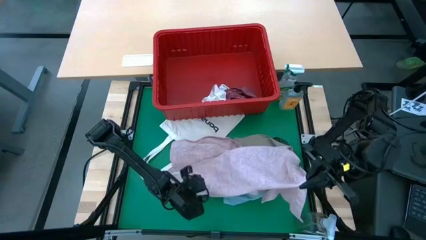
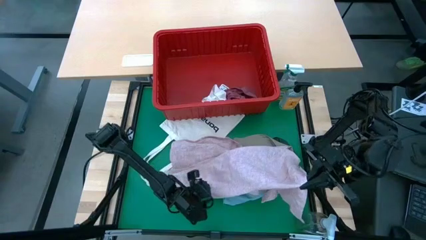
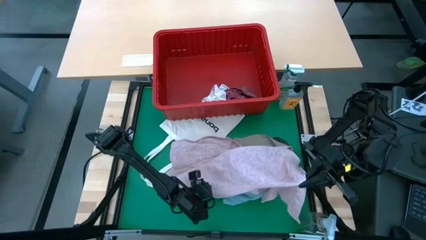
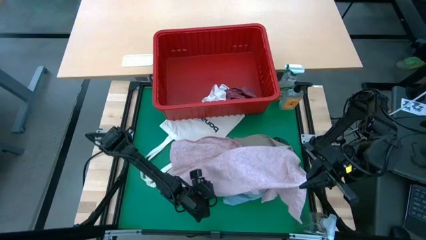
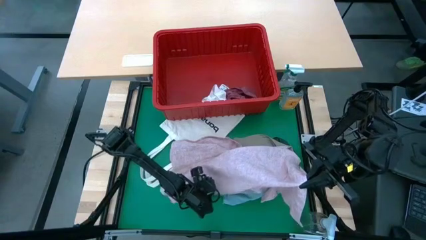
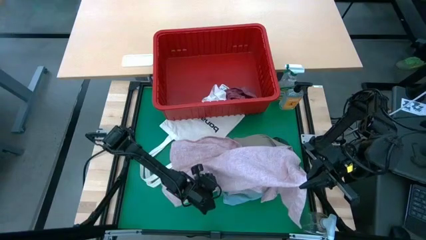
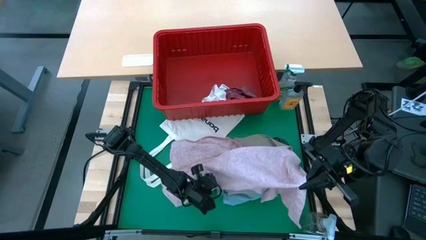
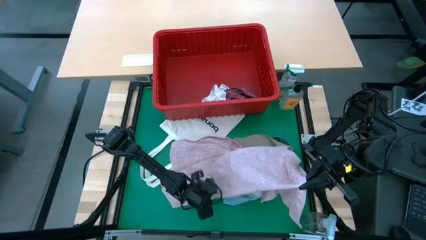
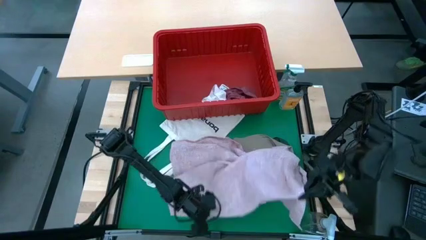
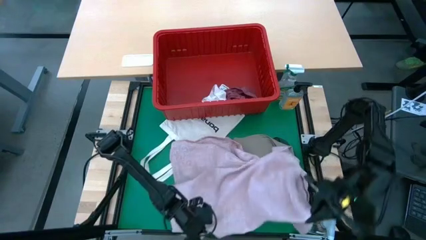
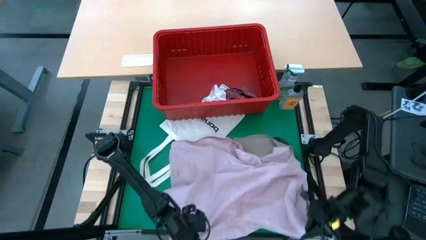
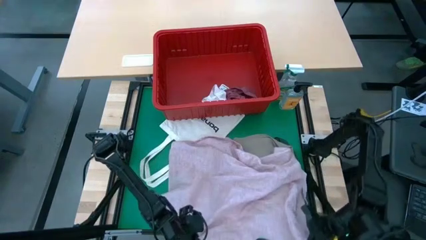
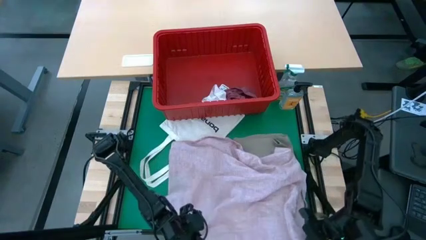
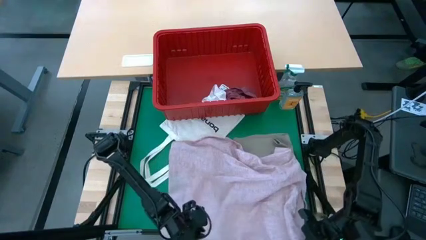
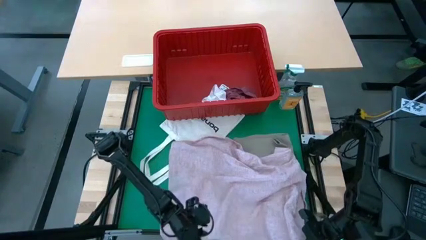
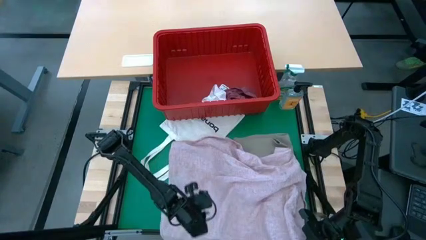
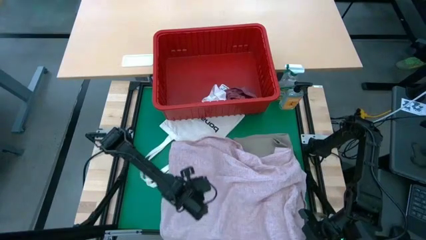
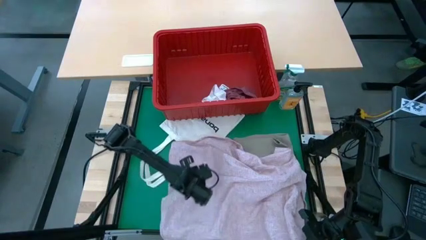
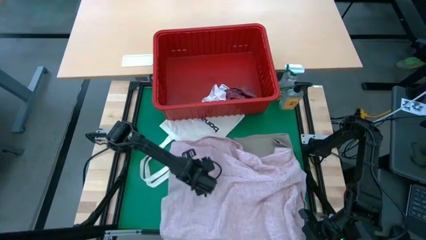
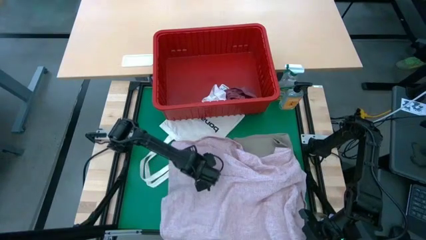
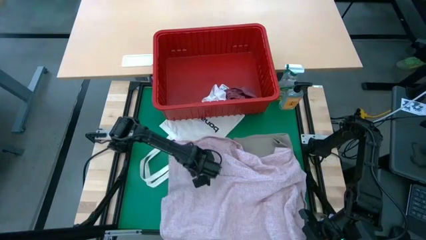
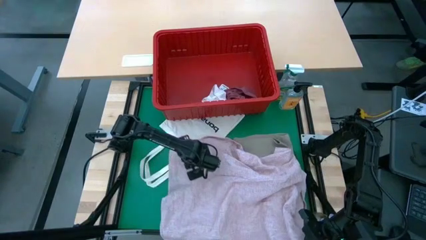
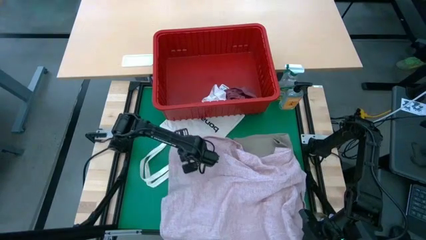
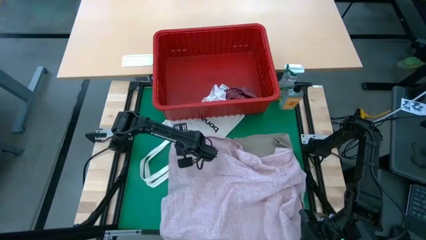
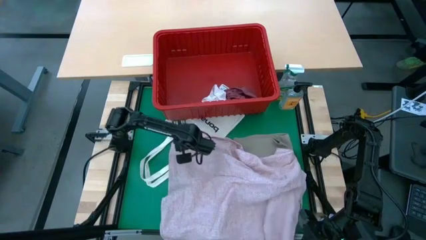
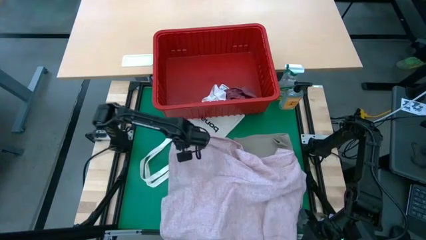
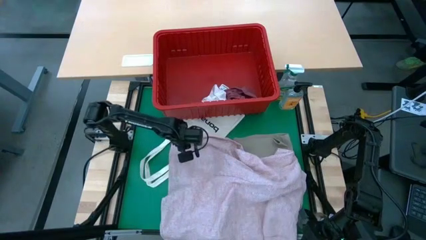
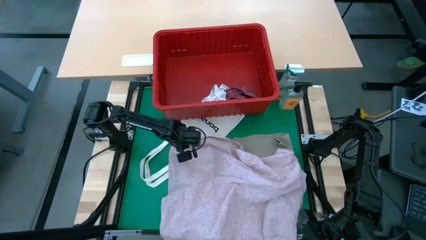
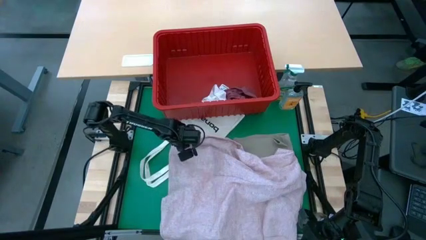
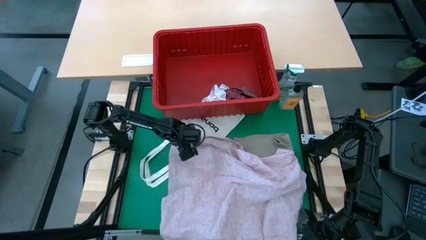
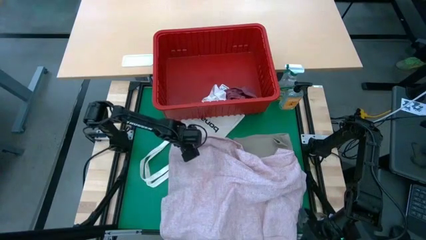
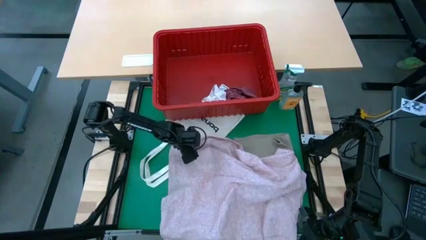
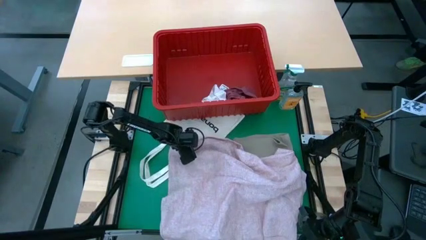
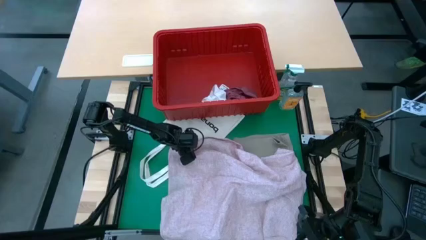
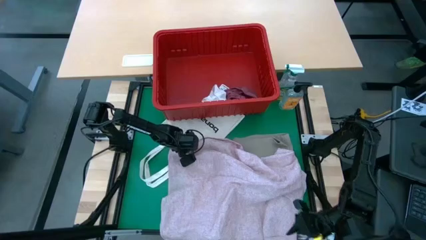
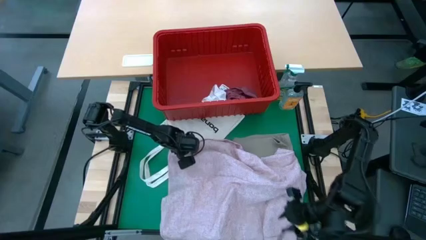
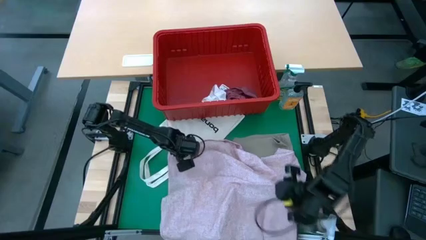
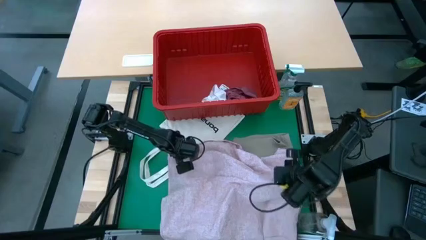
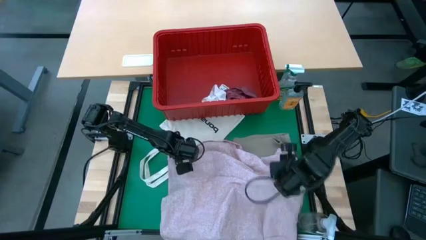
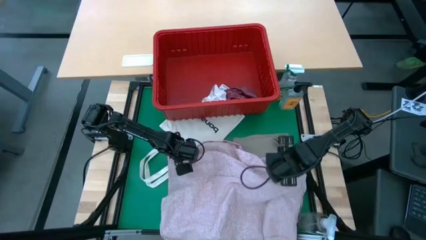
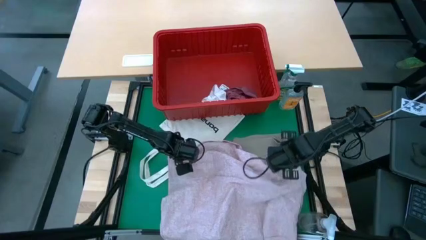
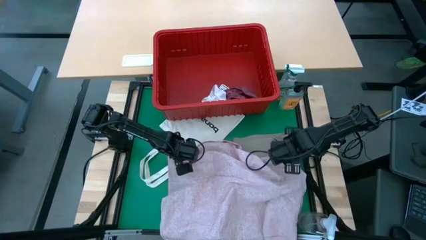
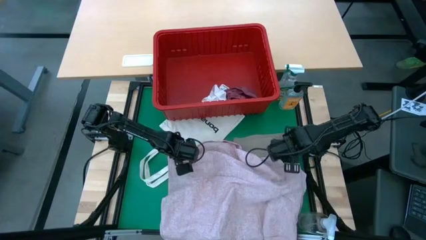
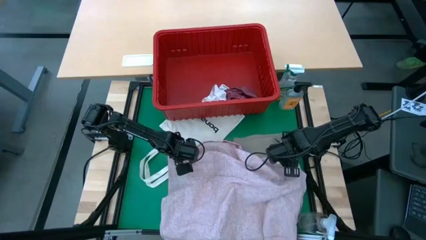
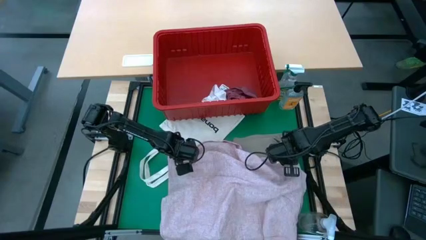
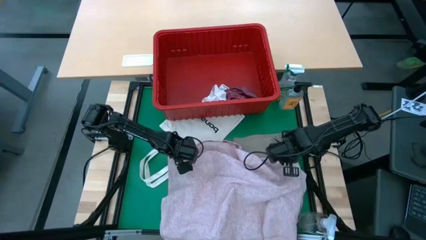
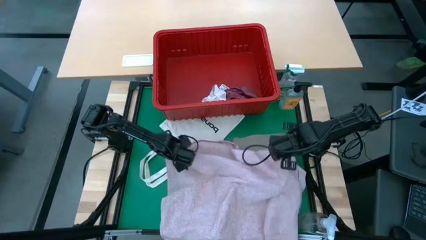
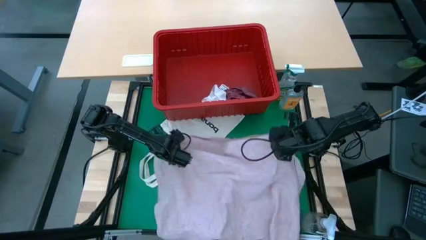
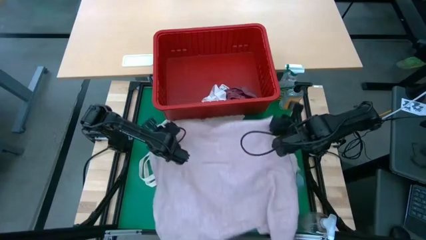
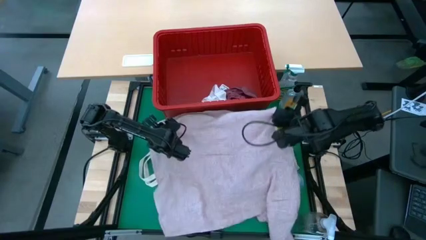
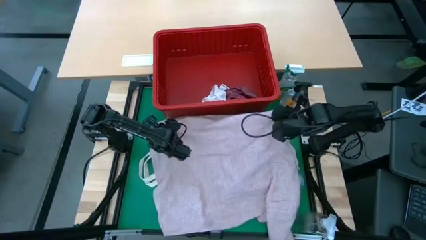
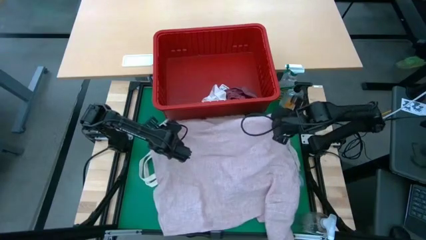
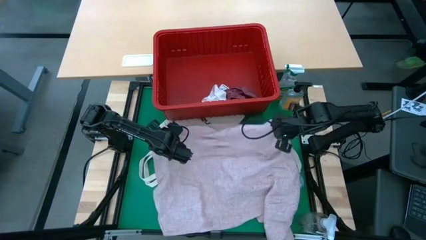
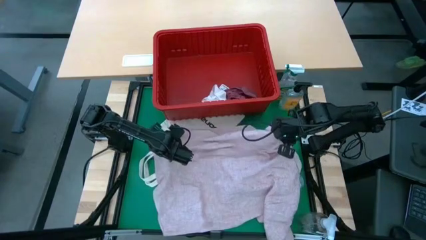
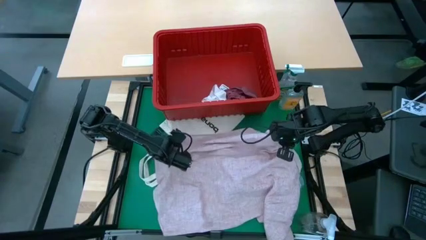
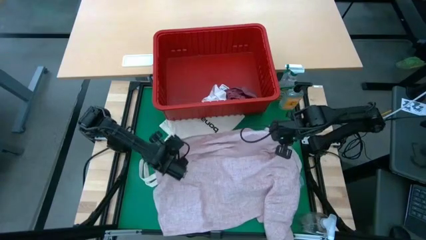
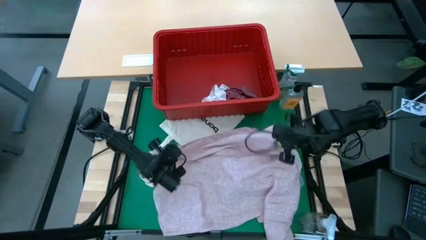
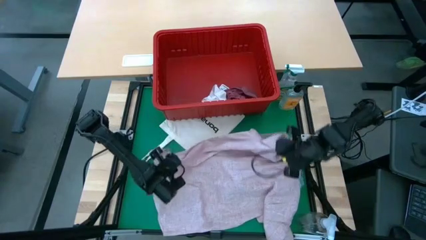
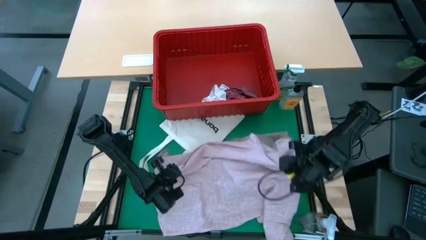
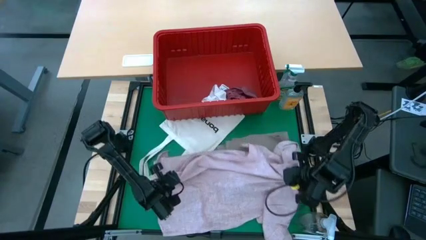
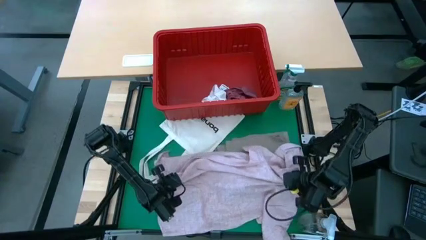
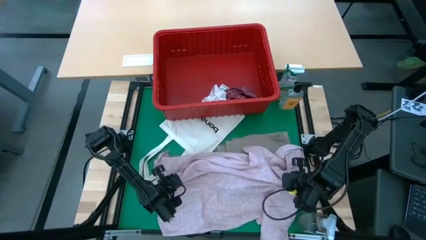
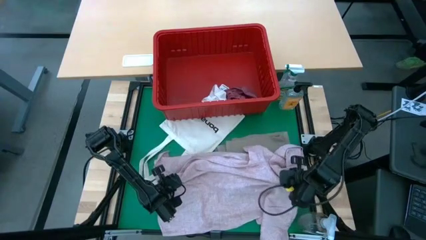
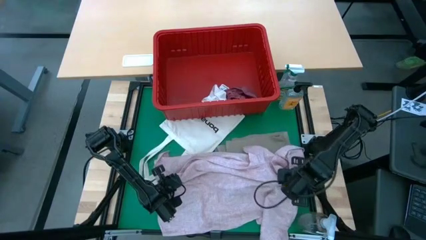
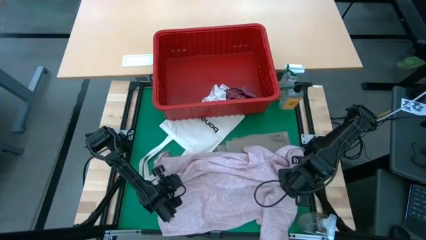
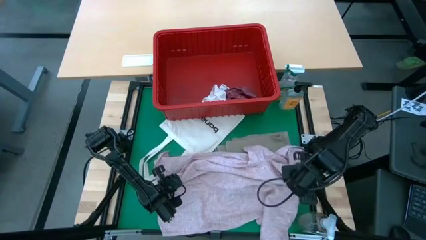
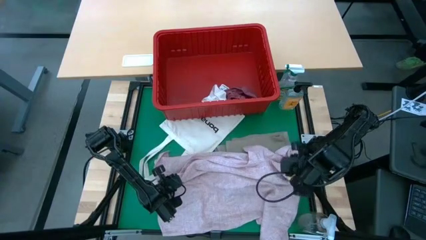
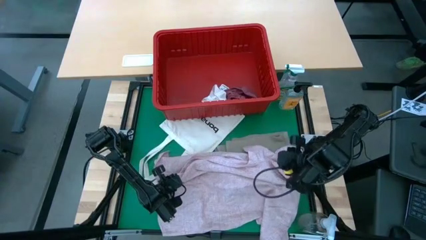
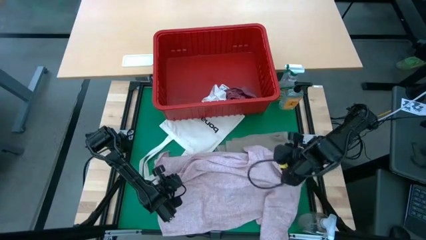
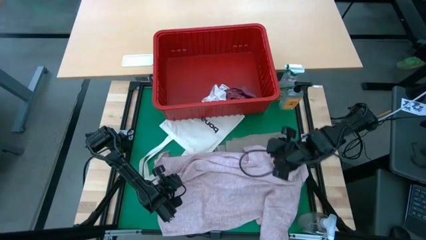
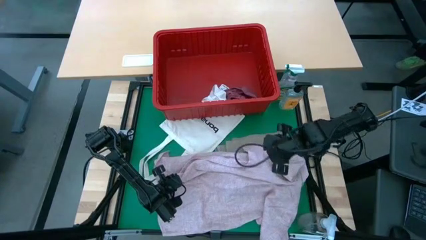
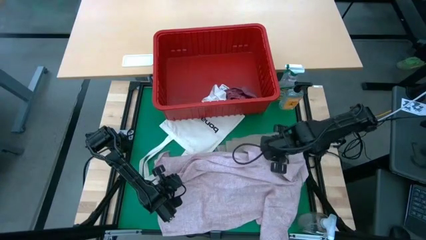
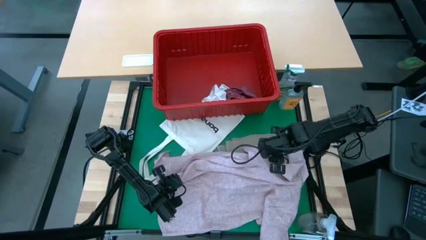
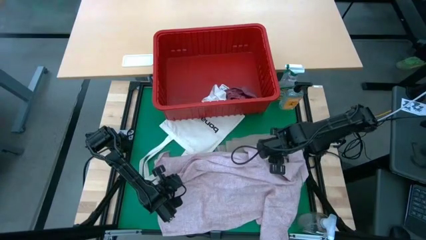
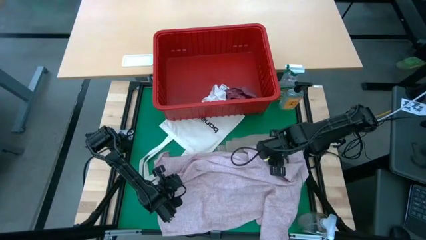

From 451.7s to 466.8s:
Task: Fold laundry
Fold the pink shirt

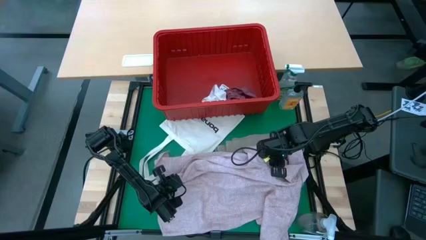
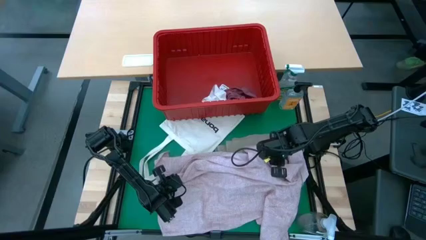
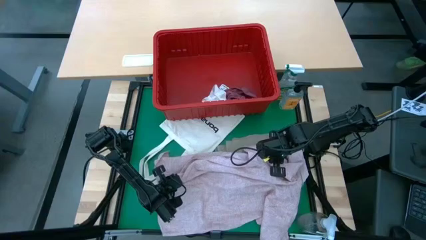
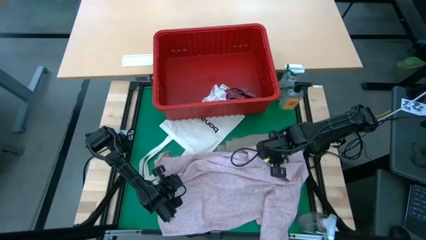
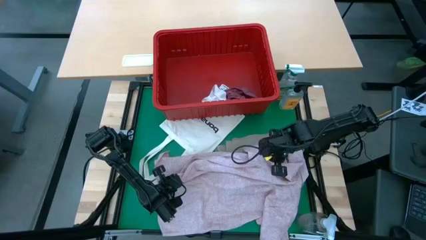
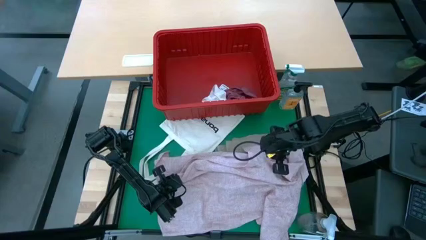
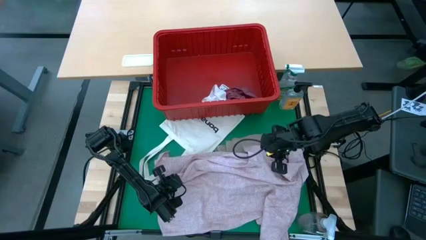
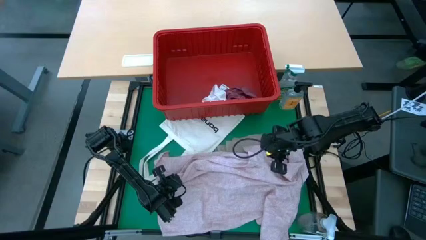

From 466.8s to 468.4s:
Fold the pink shirt
